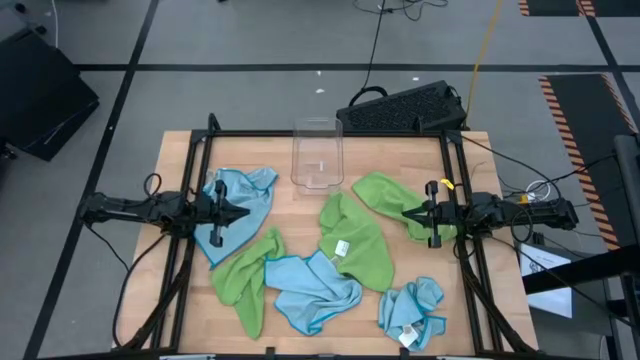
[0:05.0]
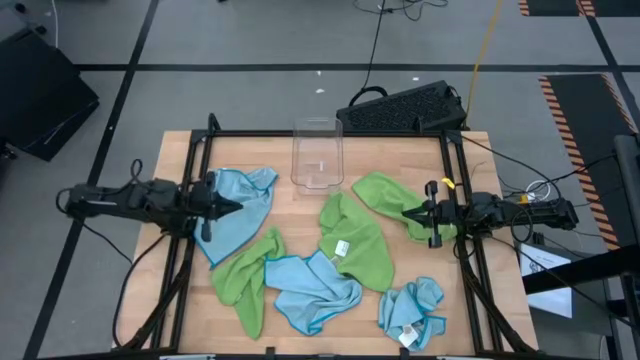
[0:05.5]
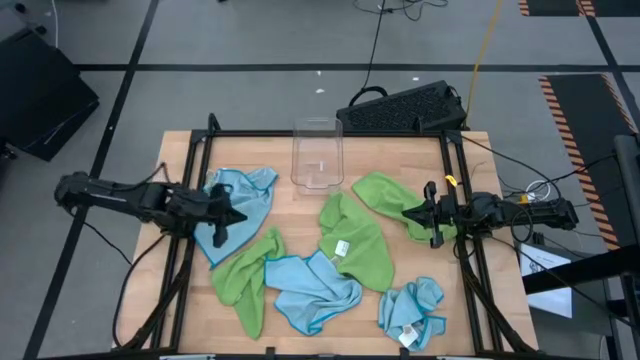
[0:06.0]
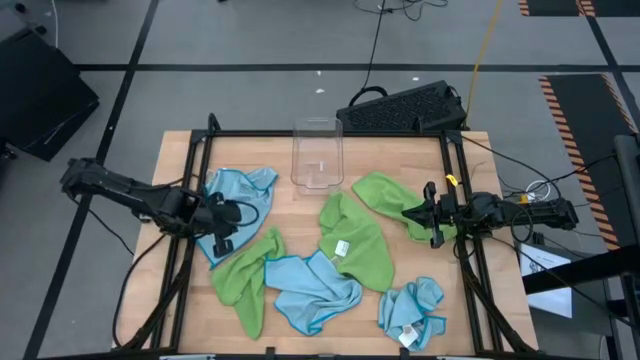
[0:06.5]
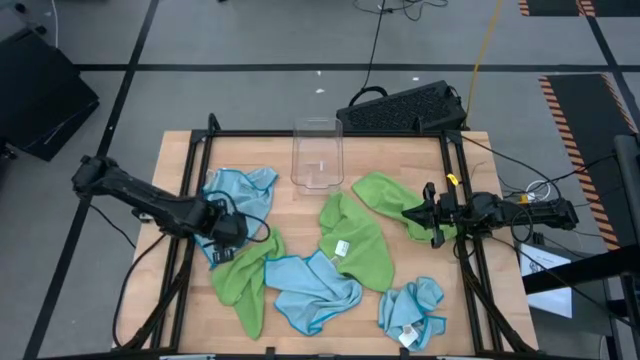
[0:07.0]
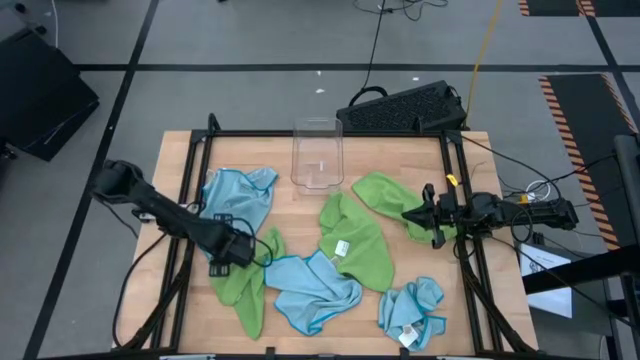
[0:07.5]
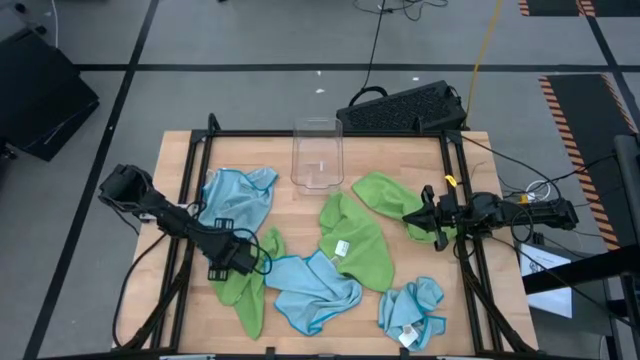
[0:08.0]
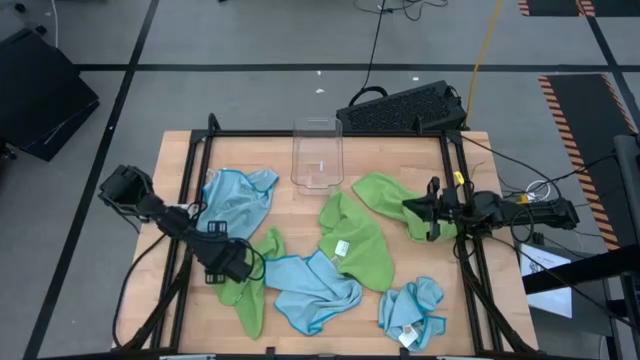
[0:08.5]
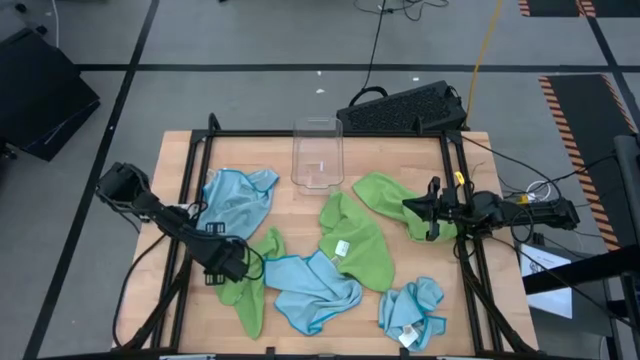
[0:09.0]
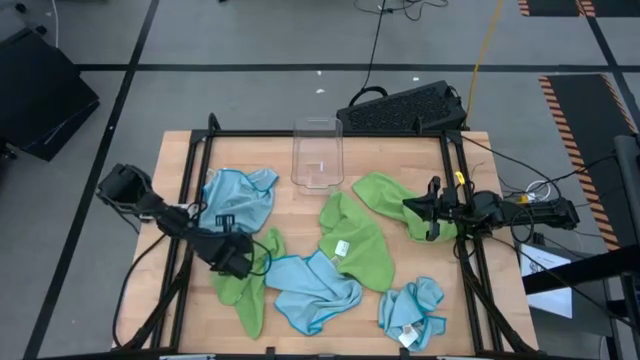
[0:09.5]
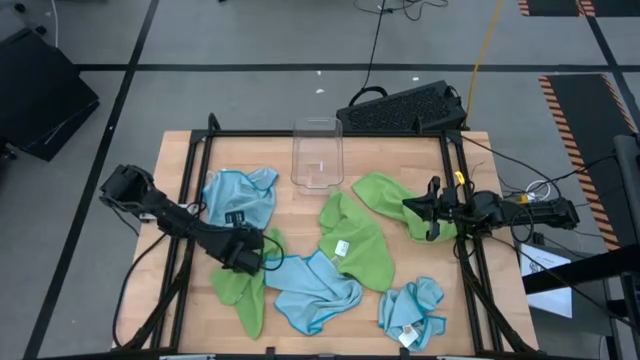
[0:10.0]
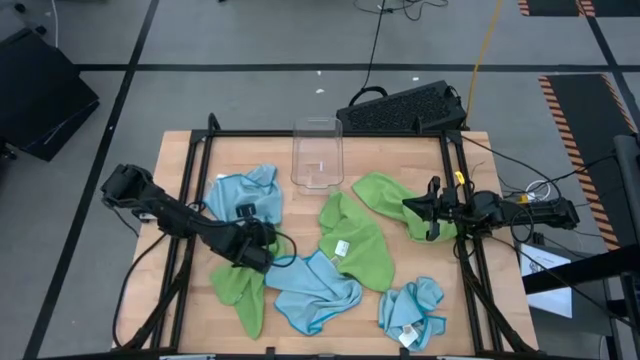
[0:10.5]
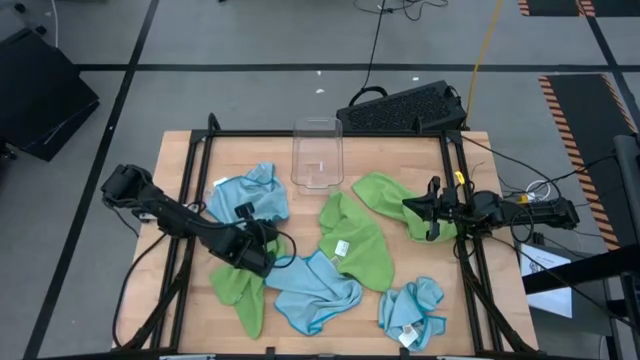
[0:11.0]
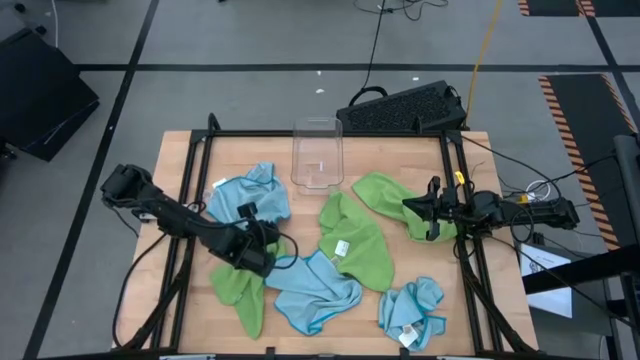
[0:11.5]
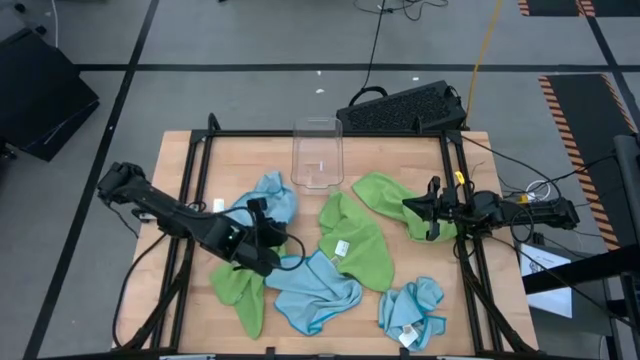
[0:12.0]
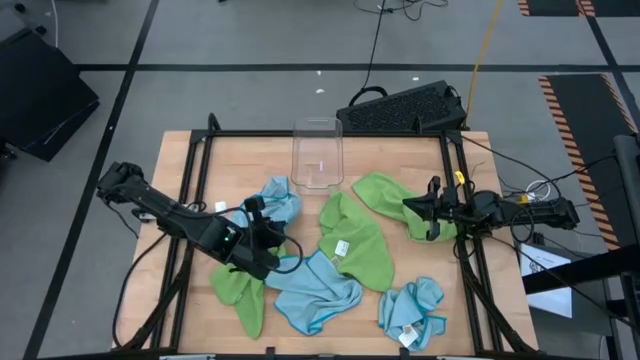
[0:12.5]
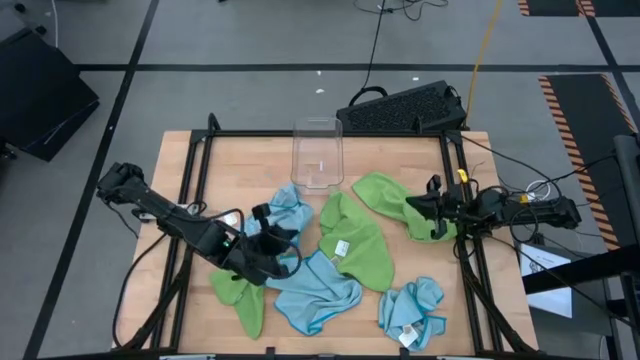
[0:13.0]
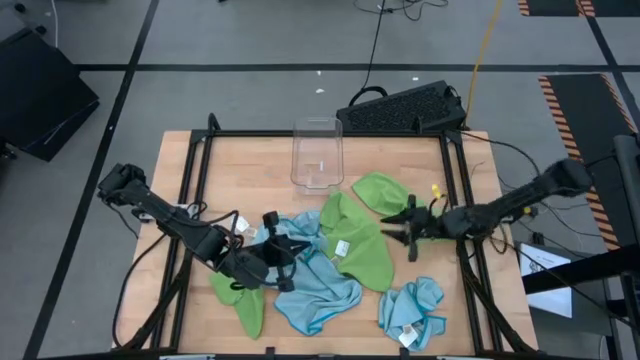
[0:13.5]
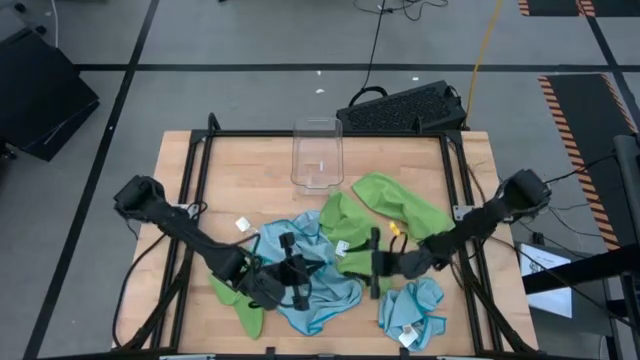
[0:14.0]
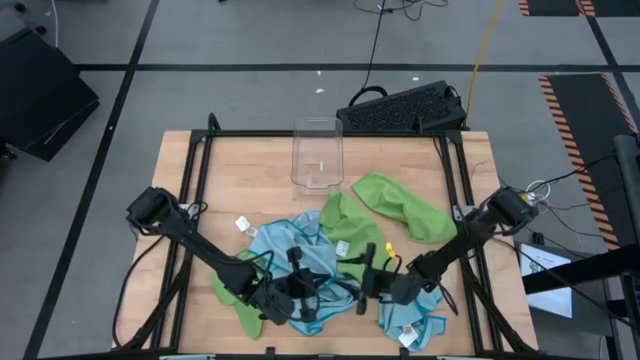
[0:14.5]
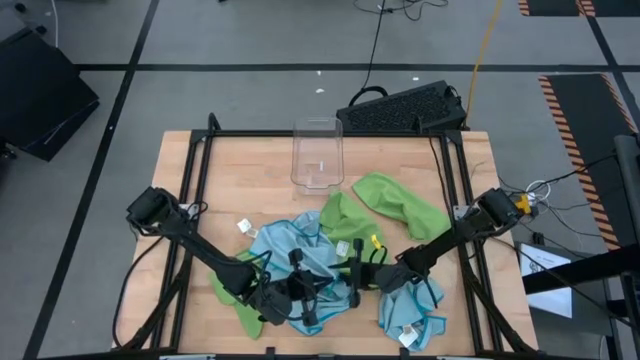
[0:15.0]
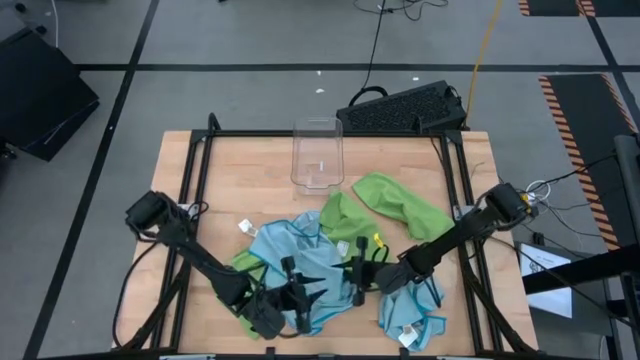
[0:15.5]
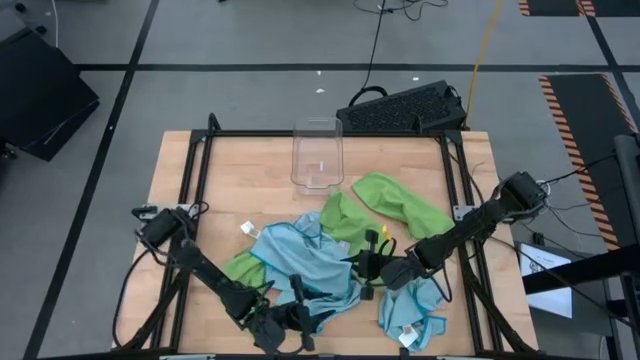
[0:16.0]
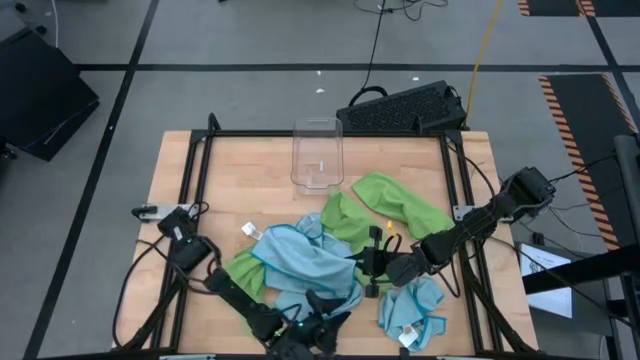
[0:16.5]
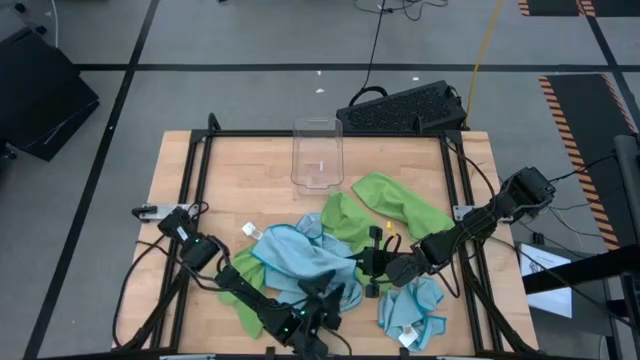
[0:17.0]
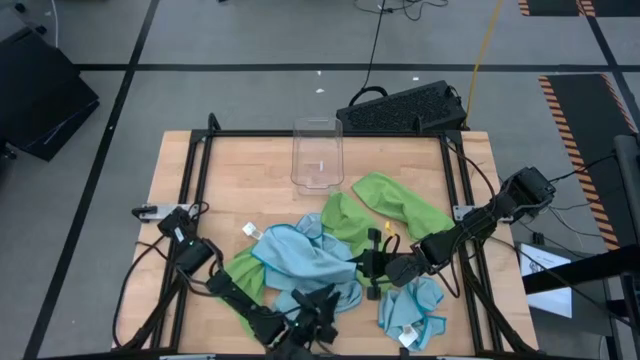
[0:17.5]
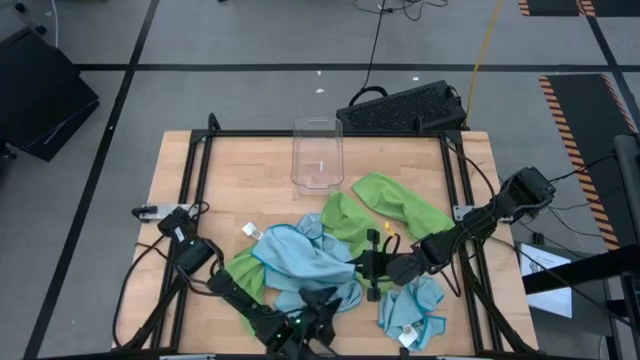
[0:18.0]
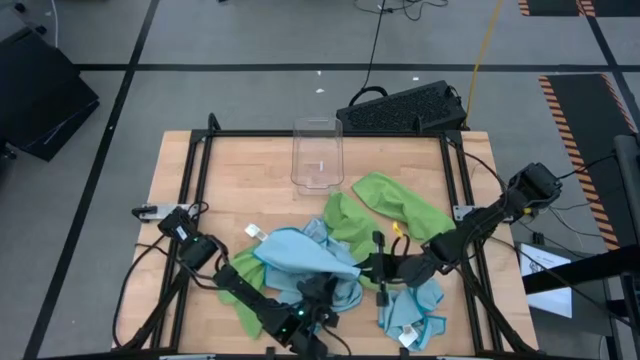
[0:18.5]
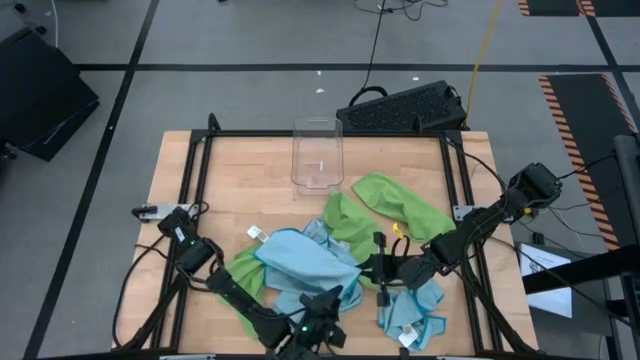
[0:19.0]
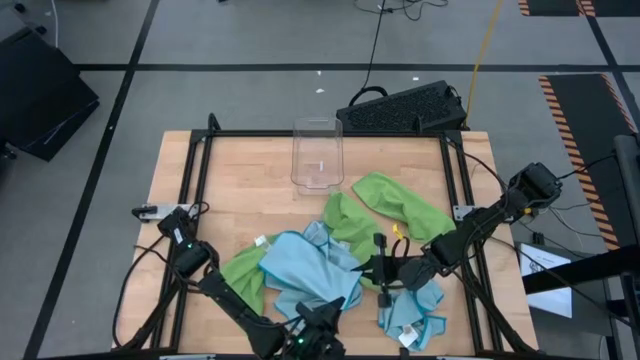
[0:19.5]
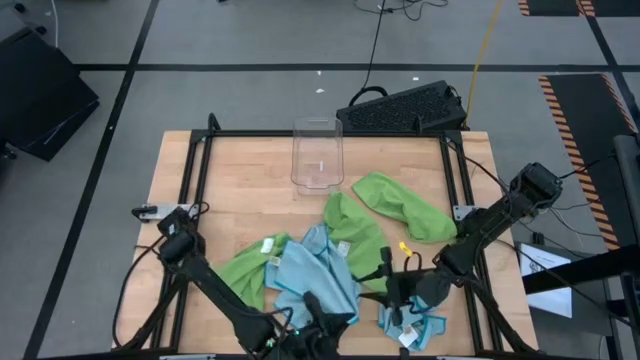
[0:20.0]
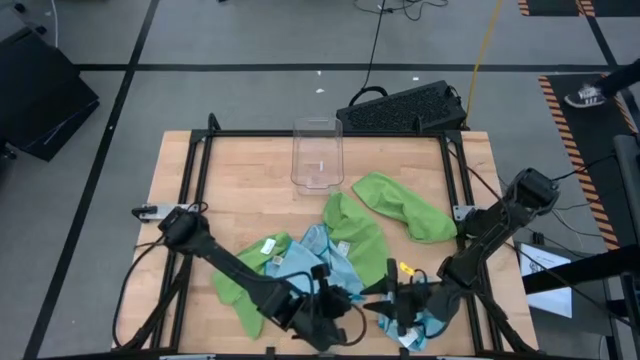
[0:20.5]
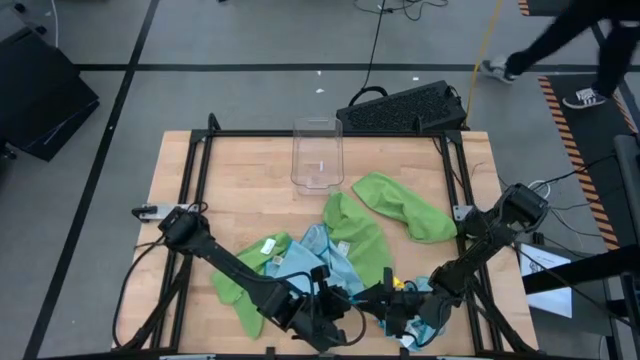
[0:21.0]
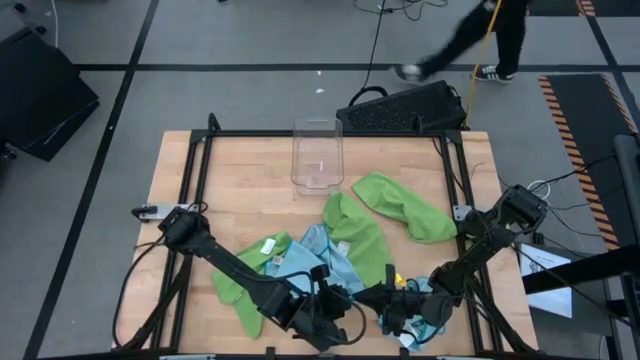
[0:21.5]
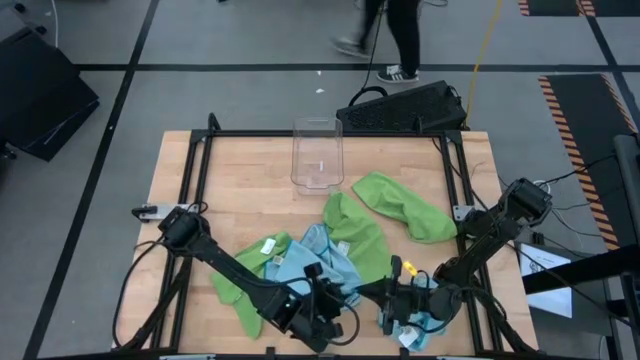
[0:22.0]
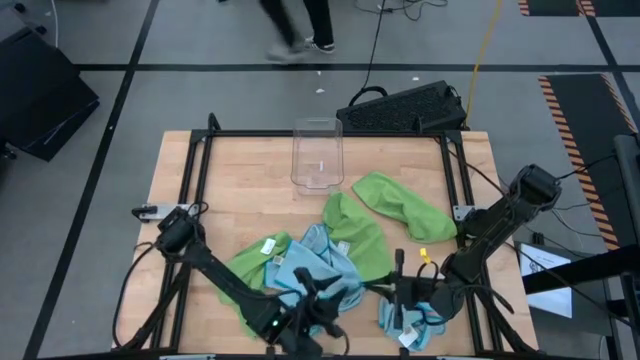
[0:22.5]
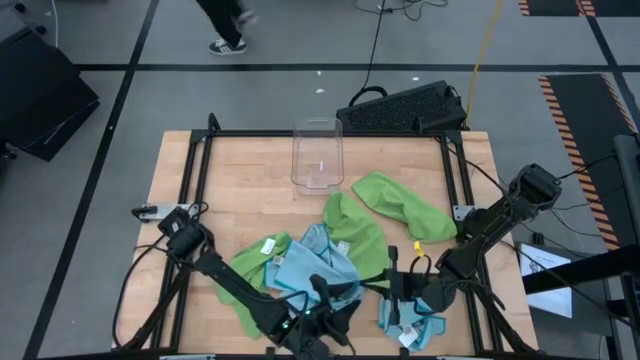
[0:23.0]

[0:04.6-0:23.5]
Task: Fold microfiber towels
Fold the top left blue towel
